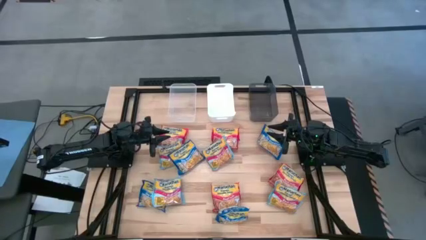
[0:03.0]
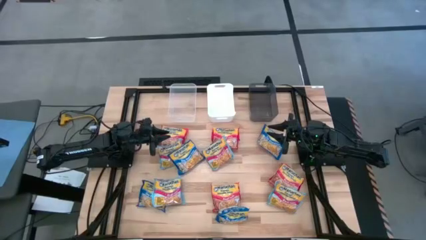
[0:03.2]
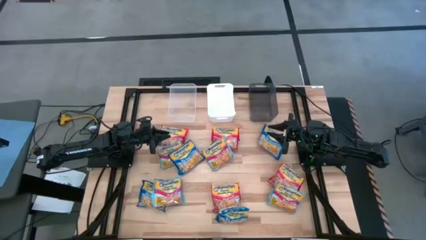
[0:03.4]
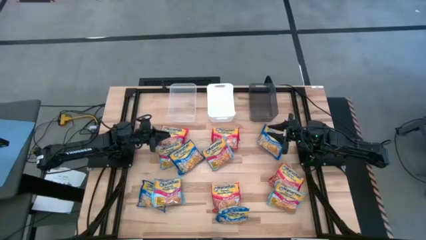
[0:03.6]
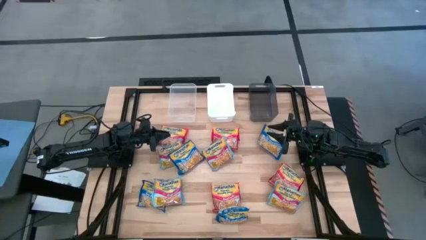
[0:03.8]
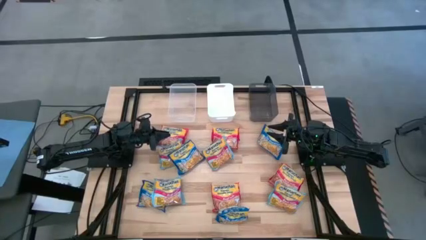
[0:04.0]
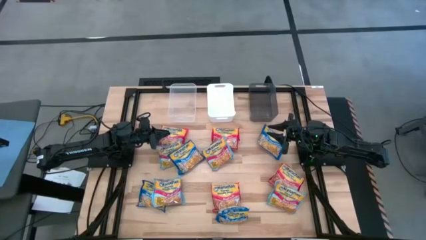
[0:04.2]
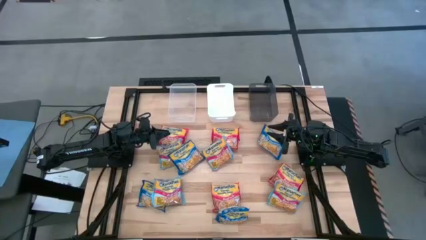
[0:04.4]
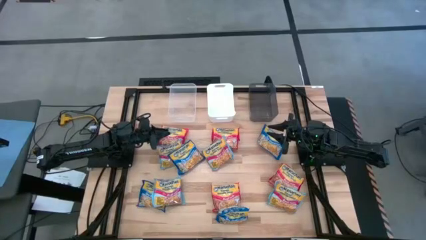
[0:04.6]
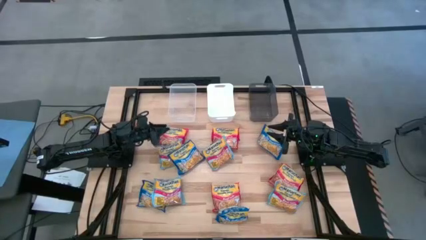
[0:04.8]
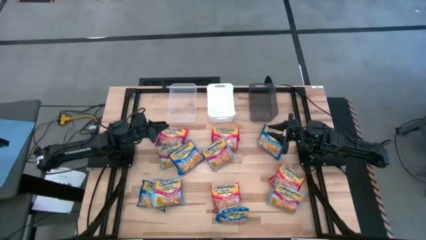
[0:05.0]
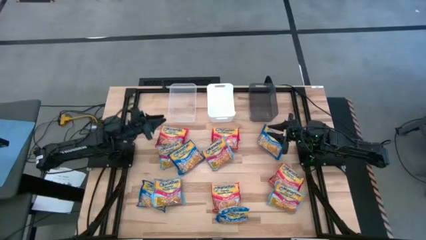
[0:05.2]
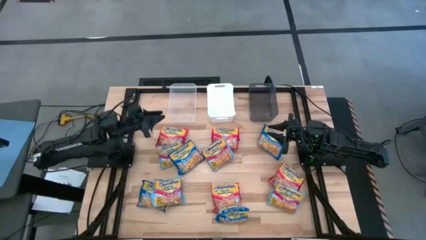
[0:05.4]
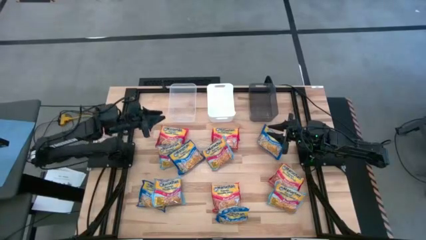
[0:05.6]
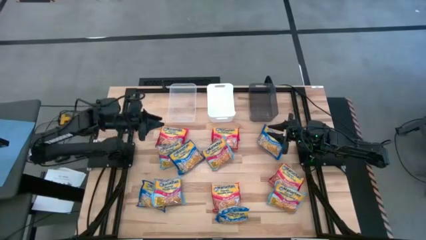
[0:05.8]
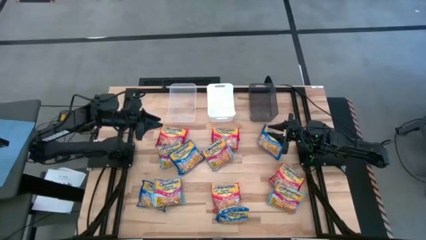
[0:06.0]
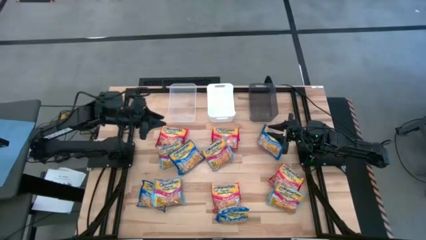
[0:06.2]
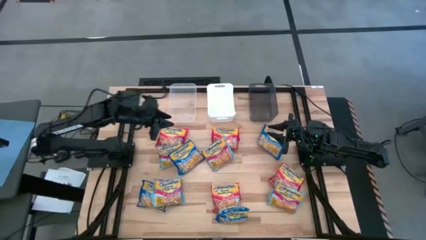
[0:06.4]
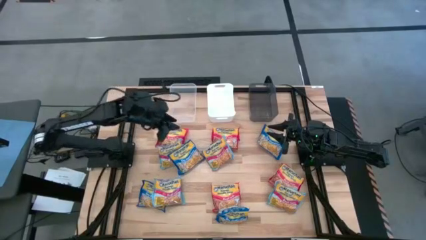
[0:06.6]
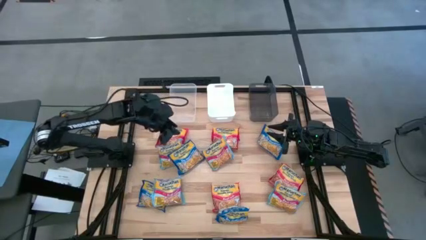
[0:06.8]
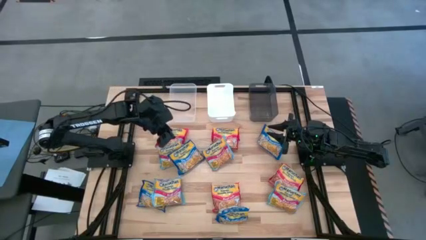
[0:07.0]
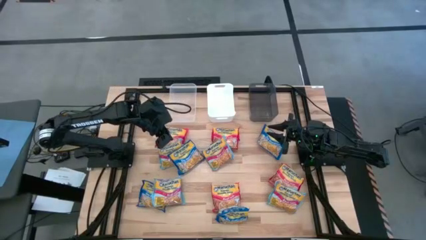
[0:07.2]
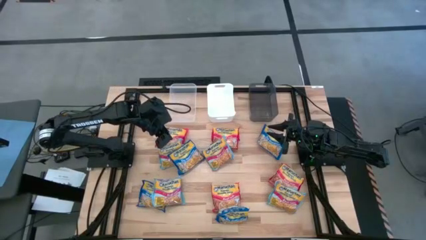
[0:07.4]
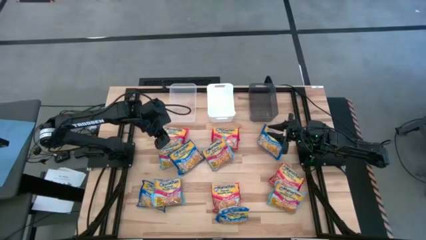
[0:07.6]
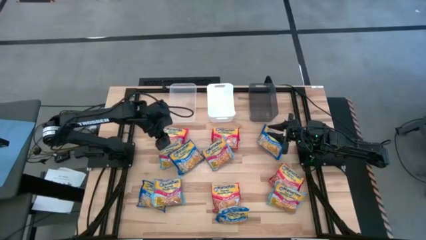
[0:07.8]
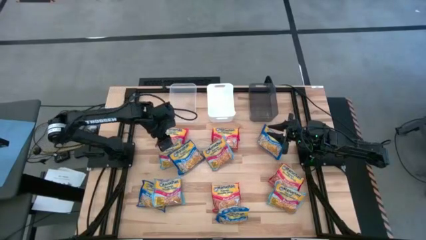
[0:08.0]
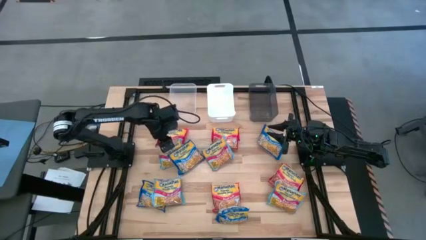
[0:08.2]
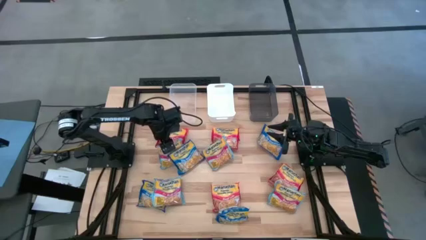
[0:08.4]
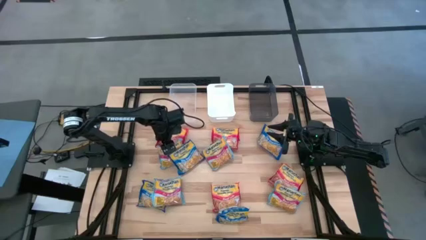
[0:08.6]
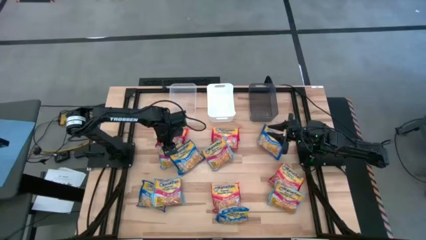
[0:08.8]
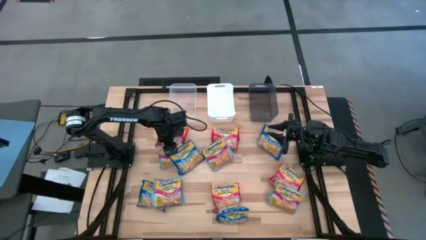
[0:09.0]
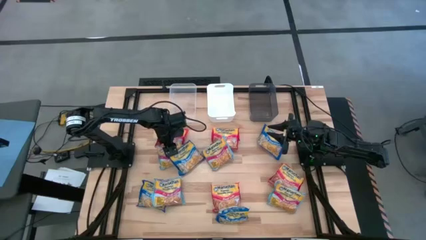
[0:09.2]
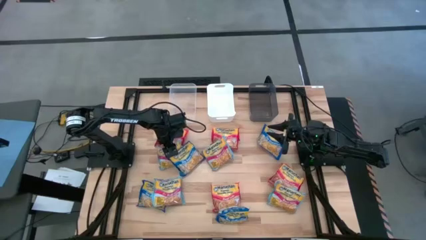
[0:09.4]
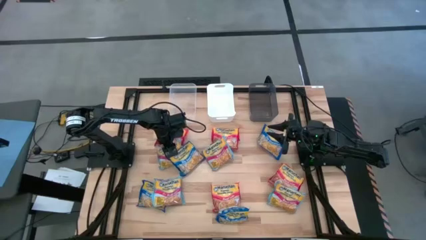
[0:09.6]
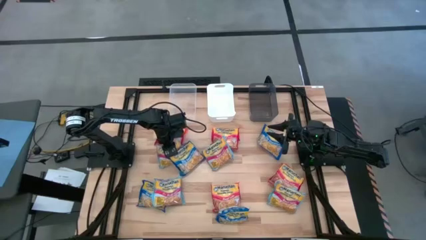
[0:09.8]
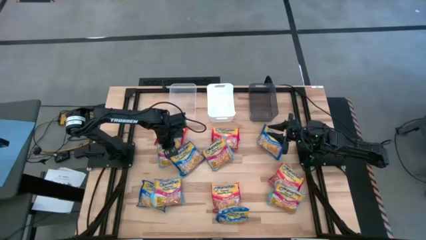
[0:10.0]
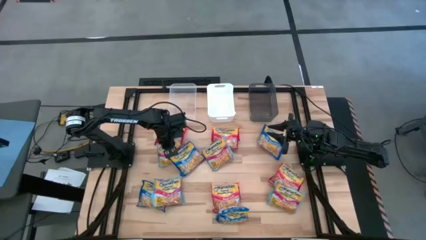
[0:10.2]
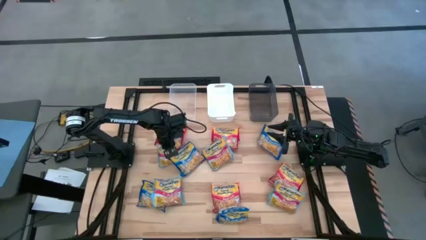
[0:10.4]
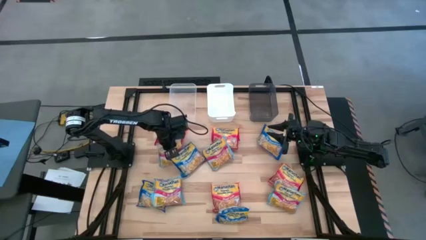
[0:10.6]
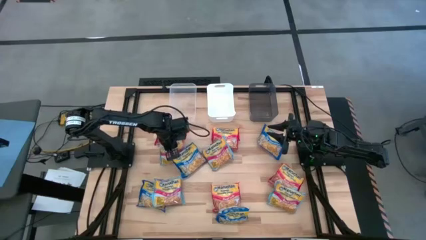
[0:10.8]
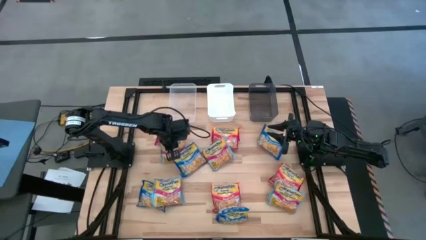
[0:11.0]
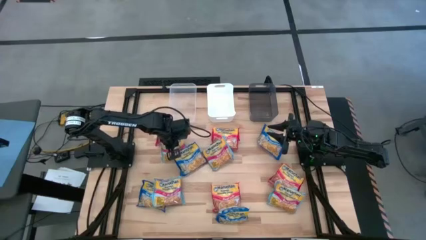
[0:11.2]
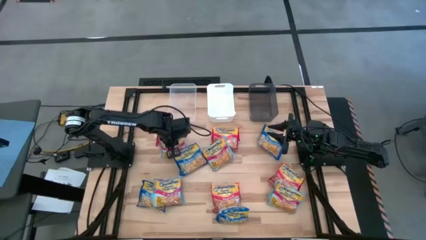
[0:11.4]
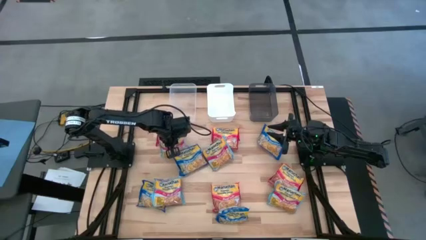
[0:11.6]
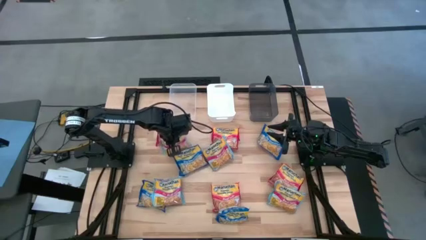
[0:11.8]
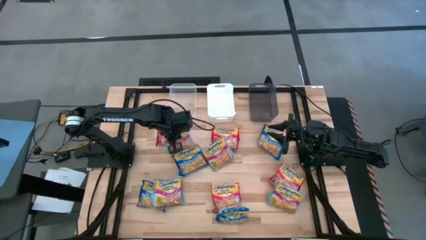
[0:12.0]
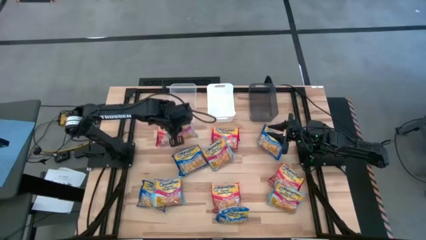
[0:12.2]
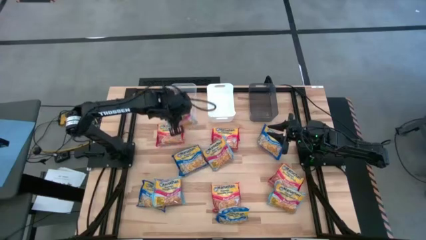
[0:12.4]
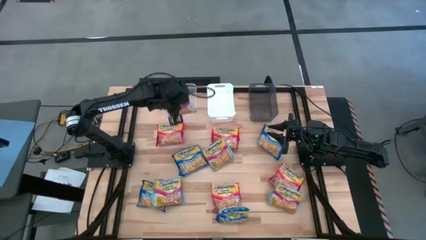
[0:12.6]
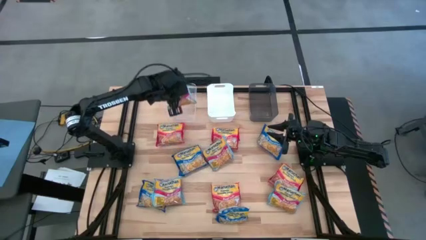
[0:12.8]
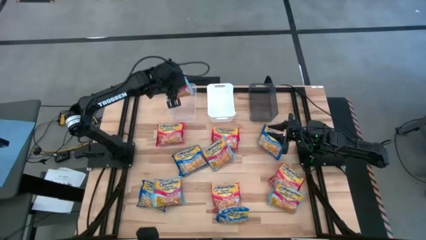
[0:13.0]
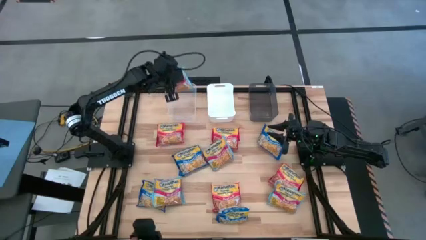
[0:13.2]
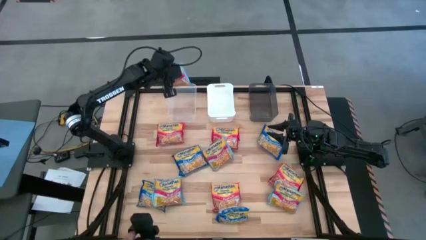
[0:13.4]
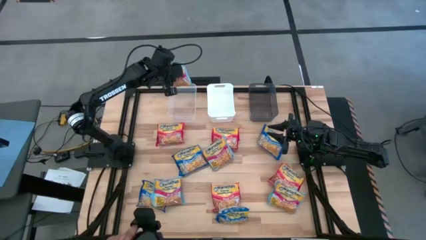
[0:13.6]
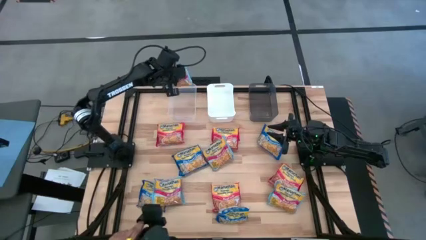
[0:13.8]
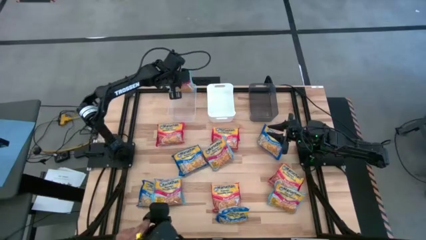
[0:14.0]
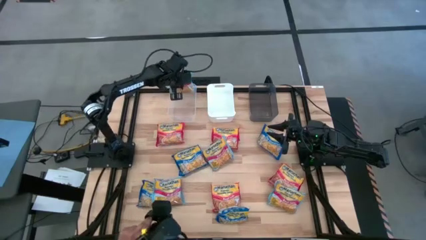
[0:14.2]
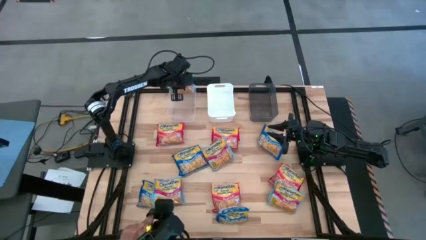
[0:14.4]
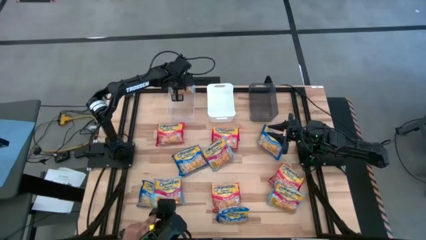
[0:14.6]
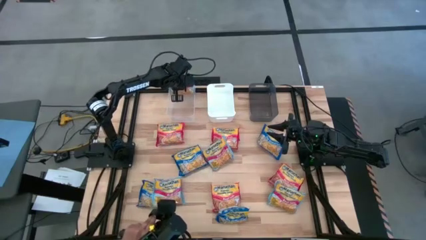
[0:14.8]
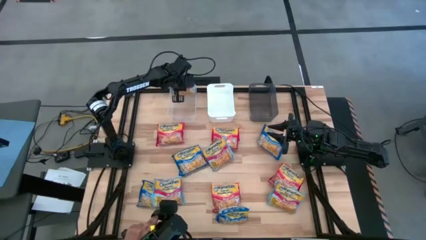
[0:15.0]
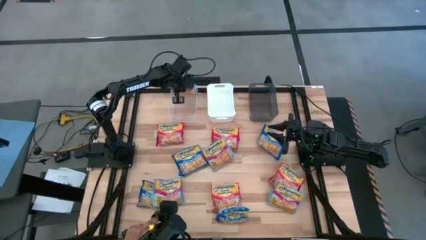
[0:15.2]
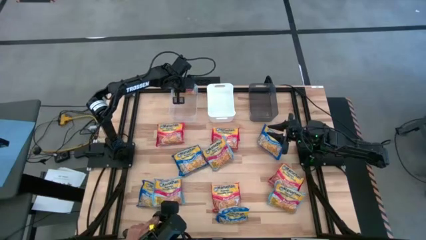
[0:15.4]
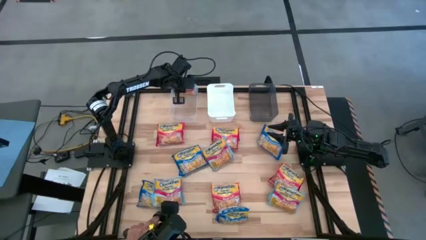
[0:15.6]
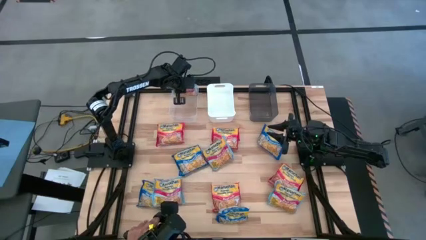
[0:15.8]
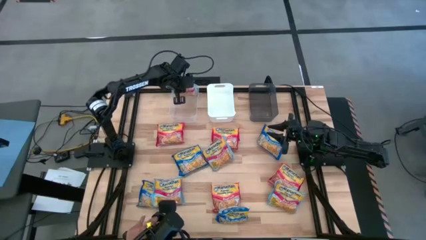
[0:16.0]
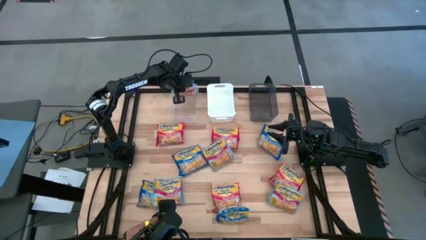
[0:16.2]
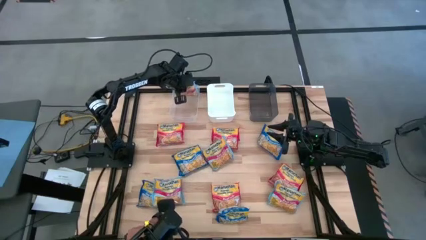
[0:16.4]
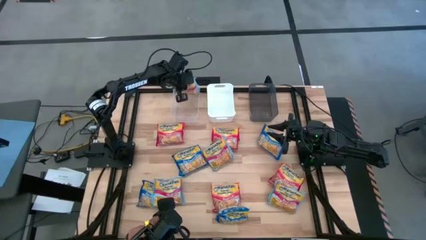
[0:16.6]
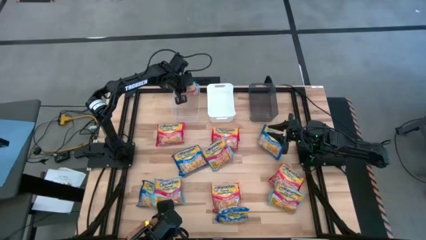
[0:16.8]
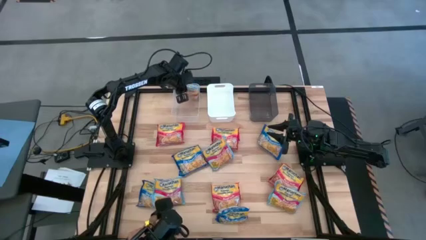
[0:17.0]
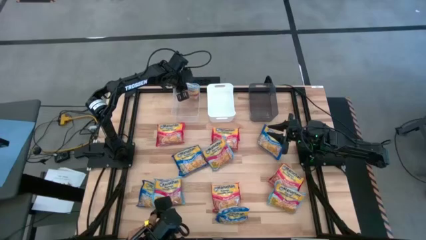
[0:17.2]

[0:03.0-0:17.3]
Task: Sort Maruchan noodles
Put the light blue bag into the transparent bin
